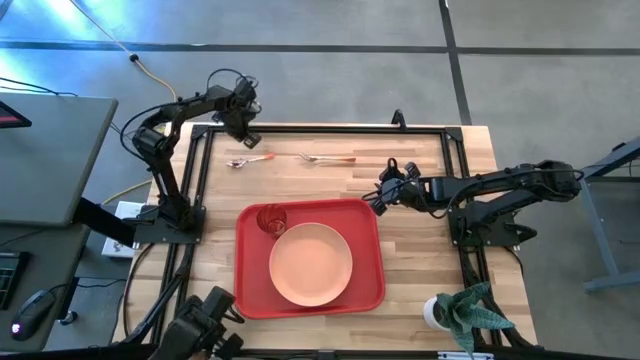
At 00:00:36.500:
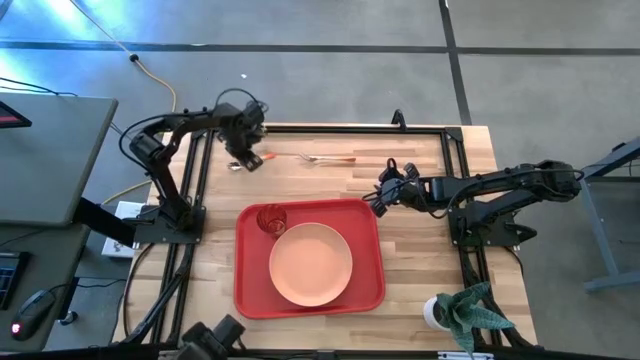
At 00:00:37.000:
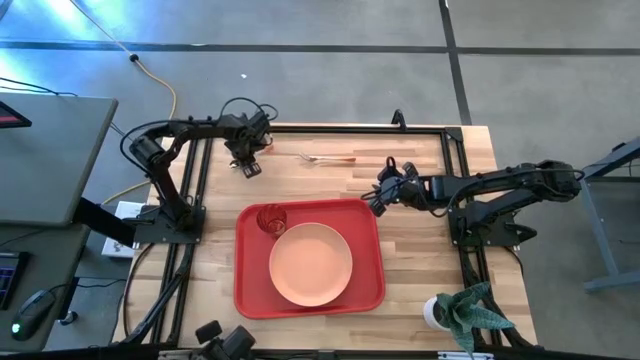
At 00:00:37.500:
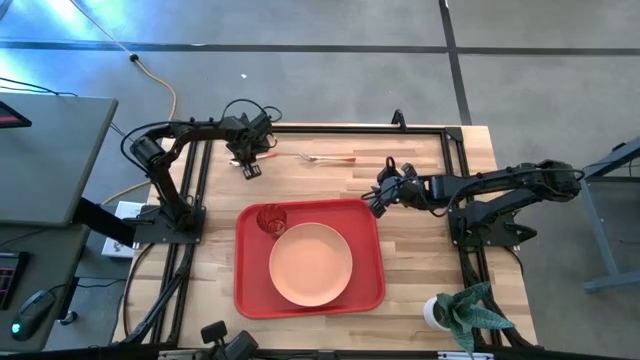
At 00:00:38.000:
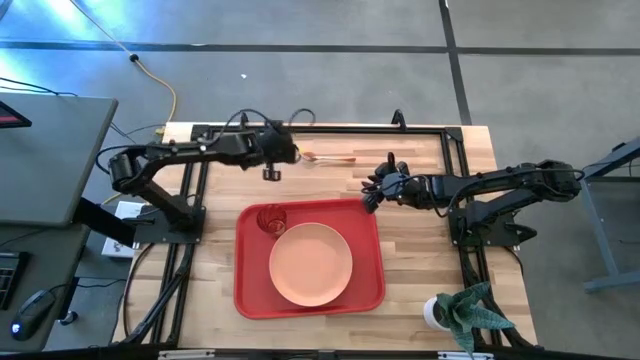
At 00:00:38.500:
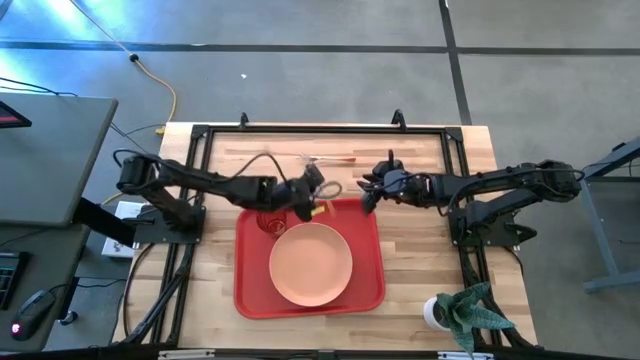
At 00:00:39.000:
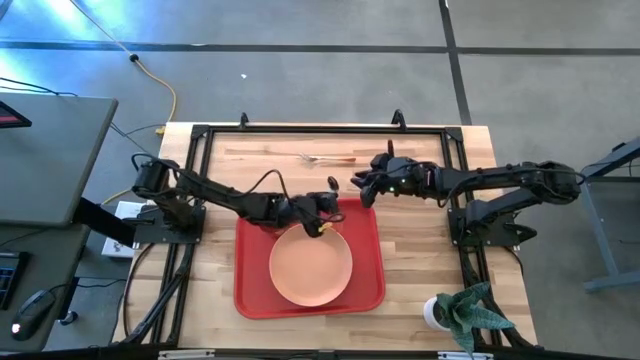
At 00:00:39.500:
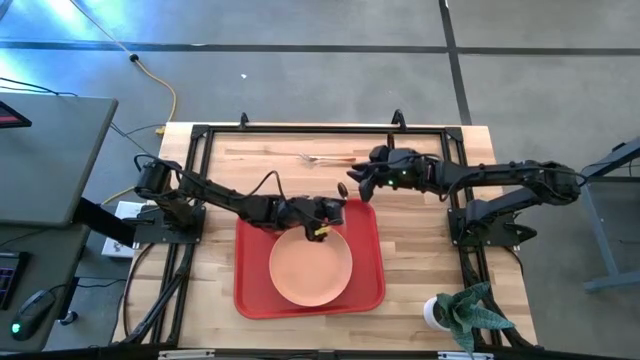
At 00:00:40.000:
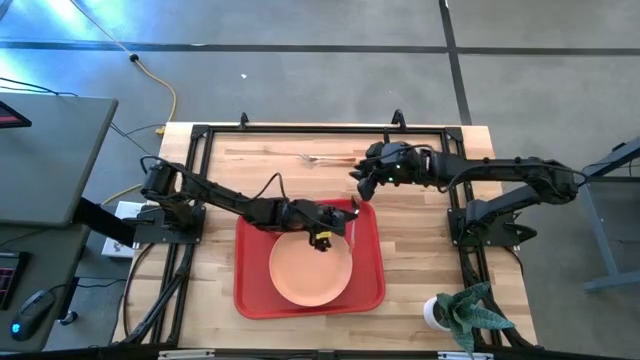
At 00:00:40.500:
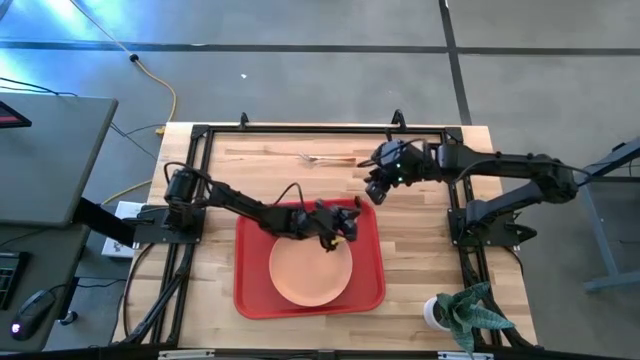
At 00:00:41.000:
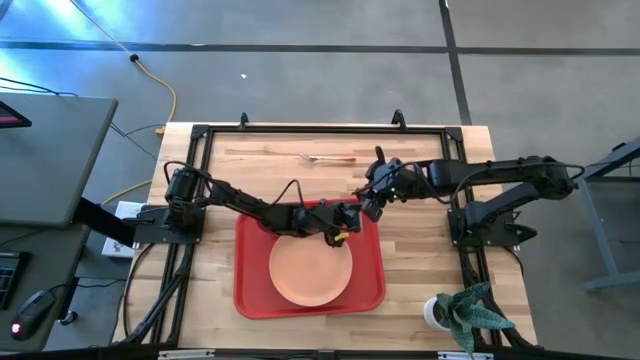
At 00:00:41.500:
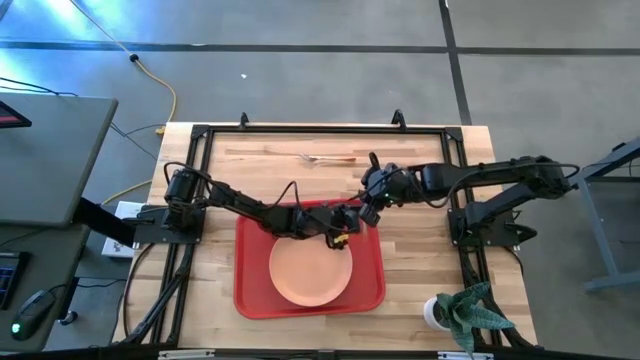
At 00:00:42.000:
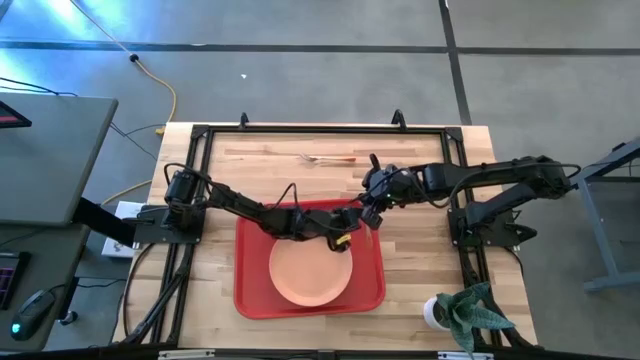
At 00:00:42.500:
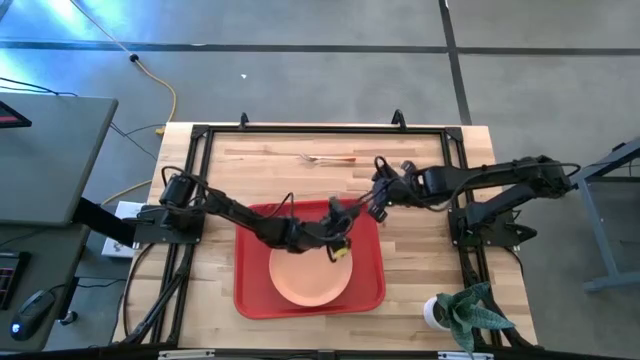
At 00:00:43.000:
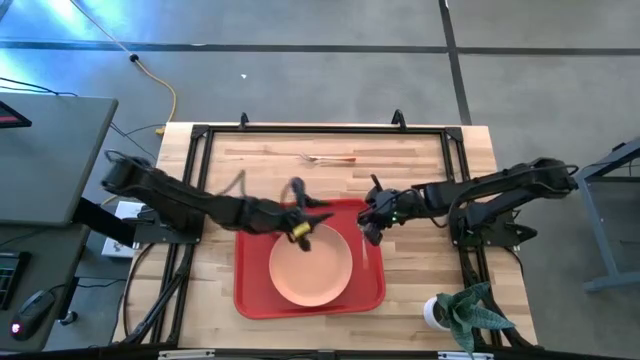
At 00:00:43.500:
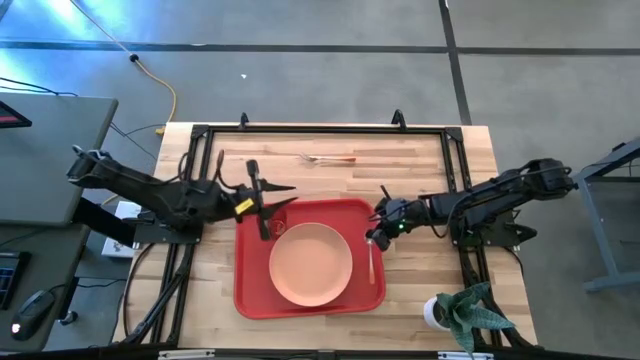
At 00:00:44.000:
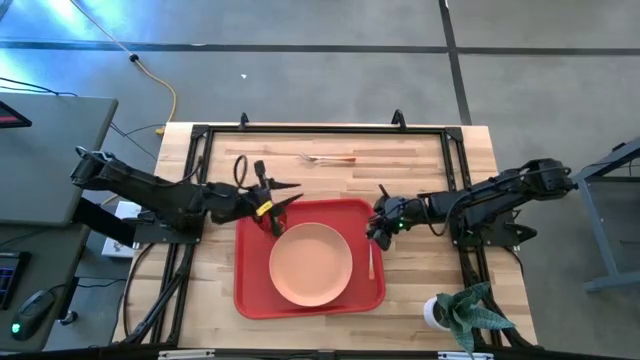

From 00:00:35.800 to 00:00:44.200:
Task: Pick and place plate/cup/fork/spoon on tray
Put the orange spoon on the red tray to the right of the orange plate

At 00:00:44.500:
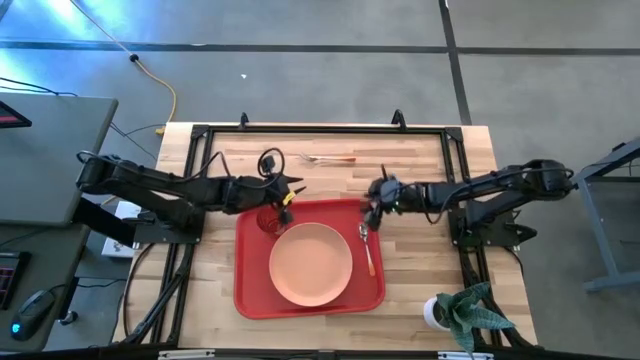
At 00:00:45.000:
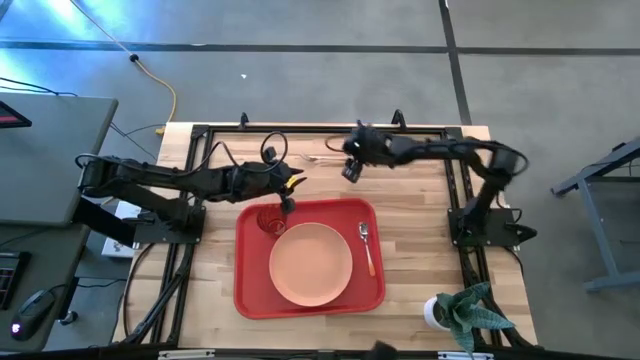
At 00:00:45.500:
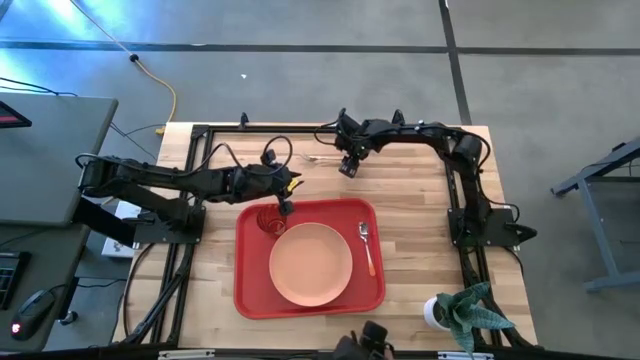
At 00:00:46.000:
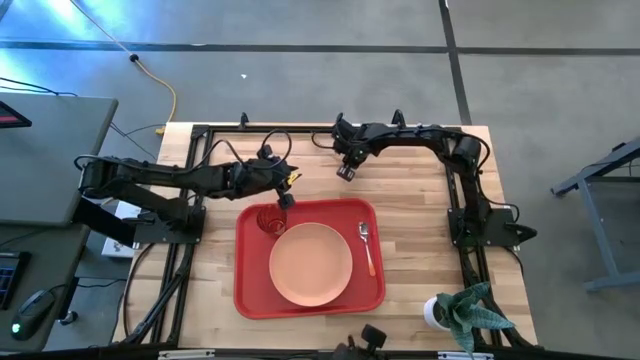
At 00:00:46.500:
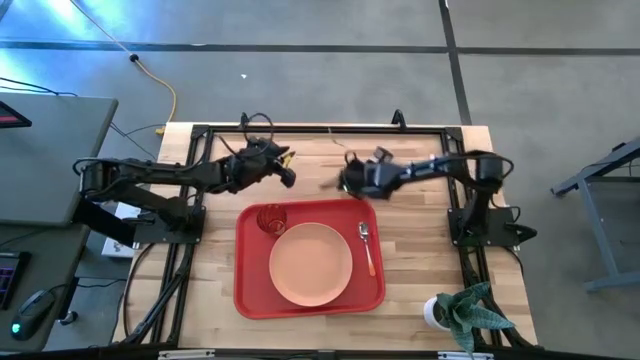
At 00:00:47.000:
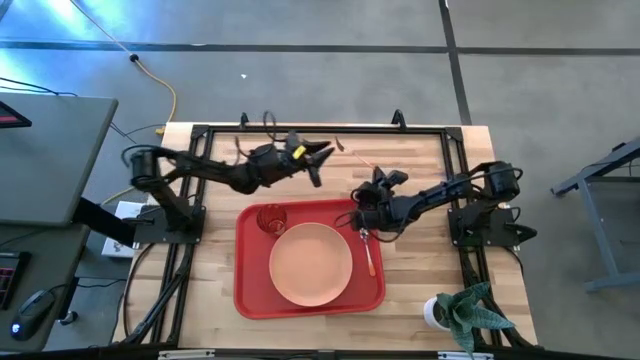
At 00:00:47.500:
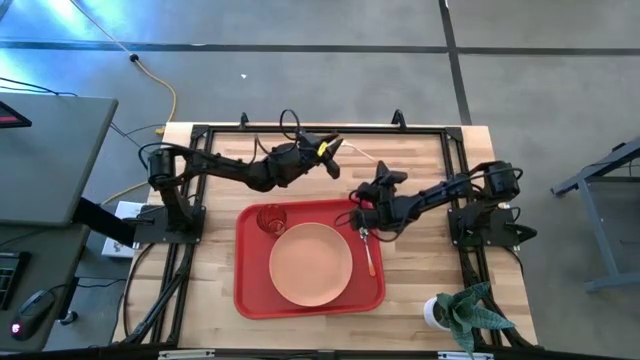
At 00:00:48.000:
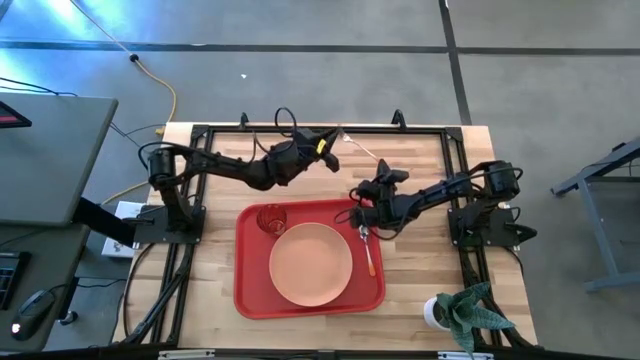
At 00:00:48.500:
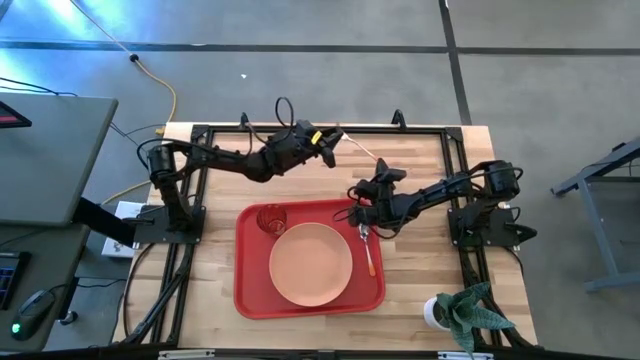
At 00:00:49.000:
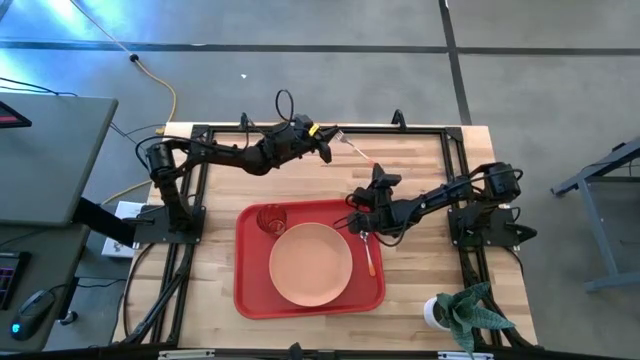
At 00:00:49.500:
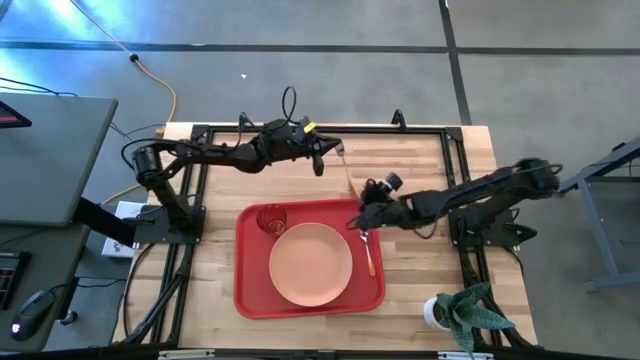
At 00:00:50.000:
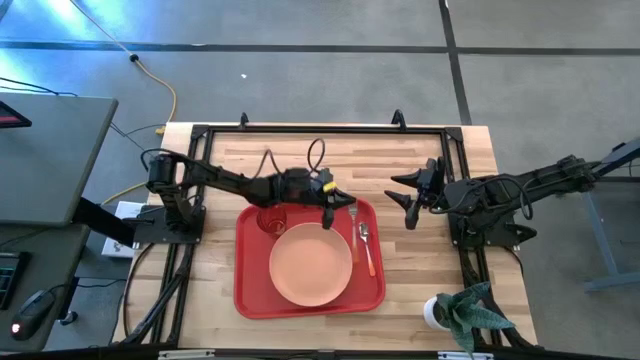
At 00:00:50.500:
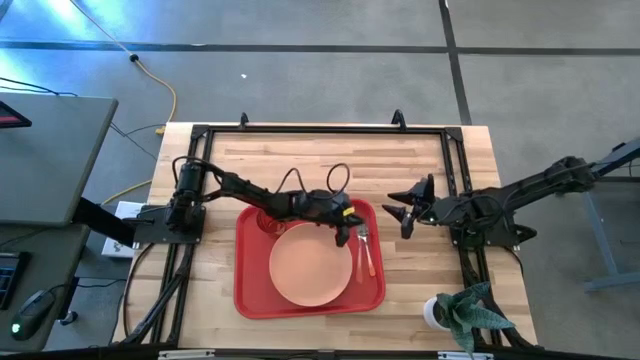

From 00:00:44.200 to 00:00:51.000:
Put the orange fork on the red tray to the right of the orange plate

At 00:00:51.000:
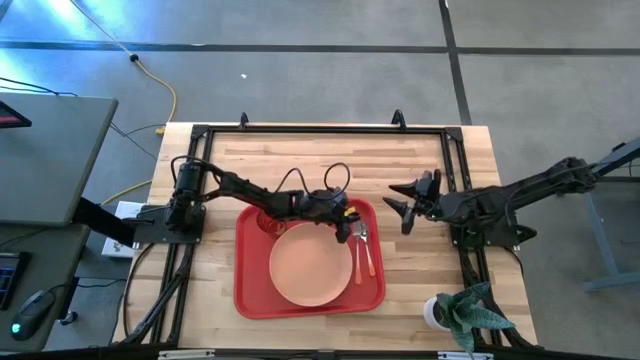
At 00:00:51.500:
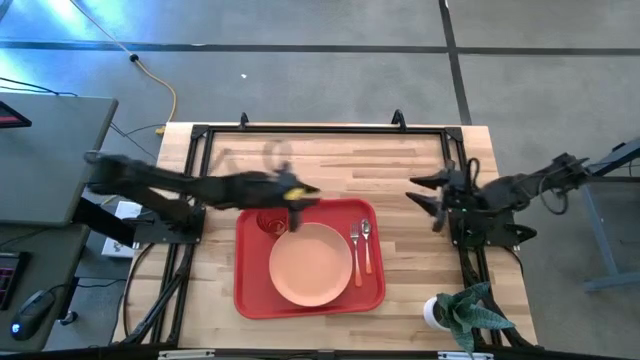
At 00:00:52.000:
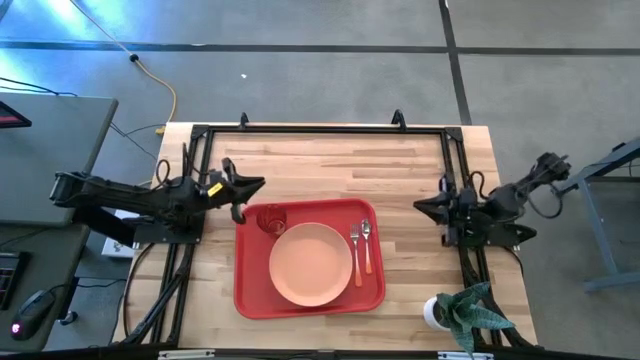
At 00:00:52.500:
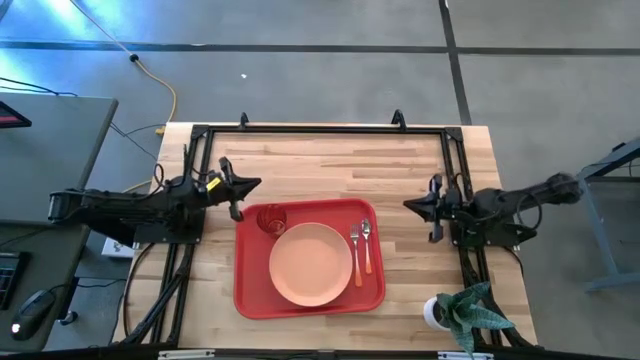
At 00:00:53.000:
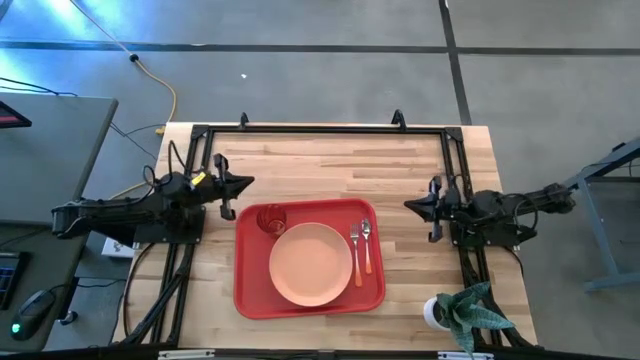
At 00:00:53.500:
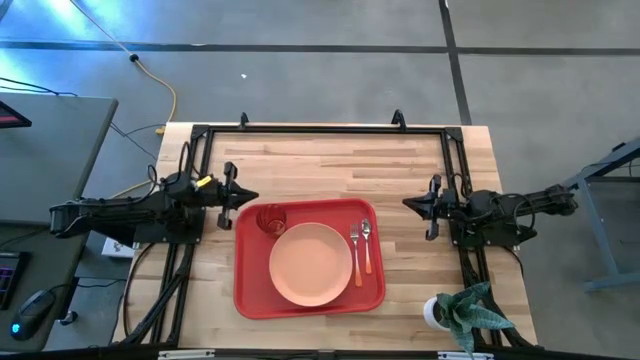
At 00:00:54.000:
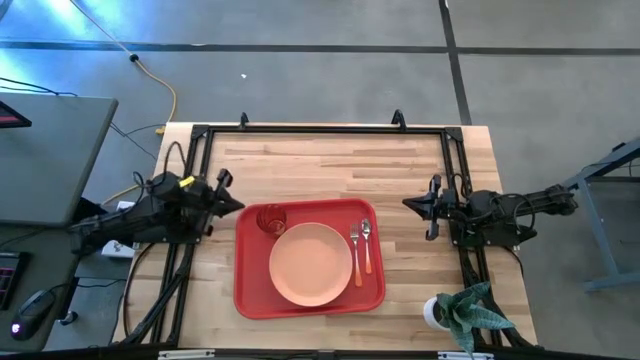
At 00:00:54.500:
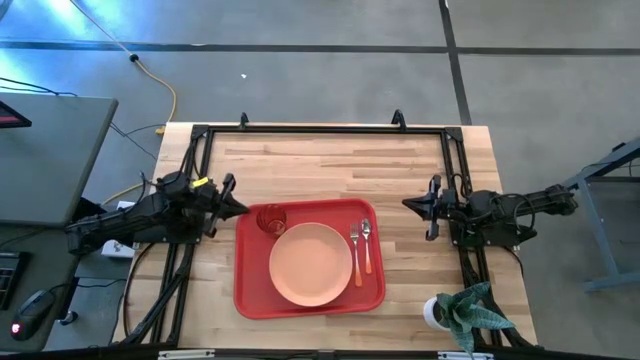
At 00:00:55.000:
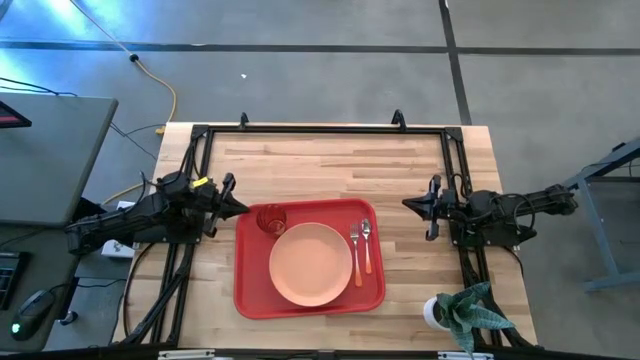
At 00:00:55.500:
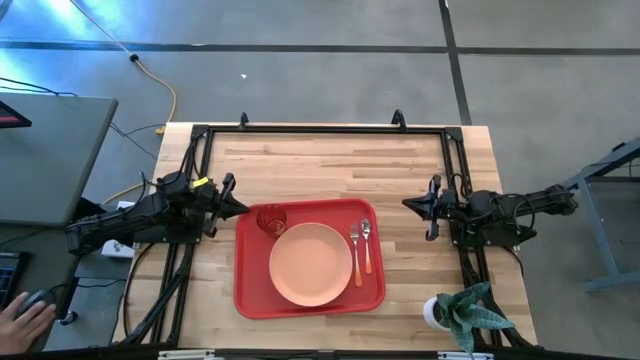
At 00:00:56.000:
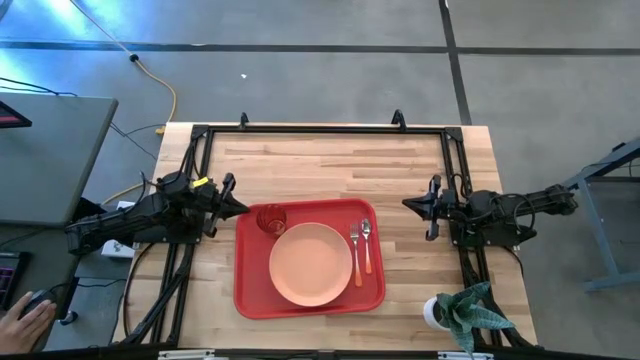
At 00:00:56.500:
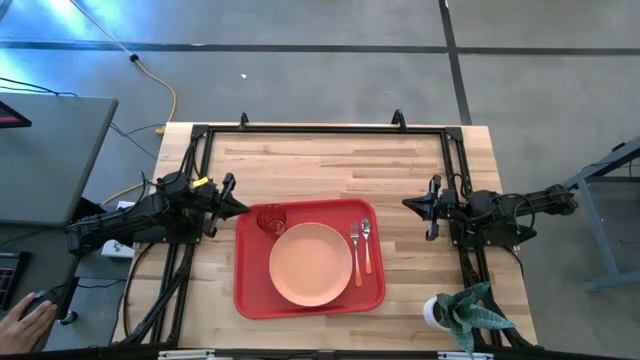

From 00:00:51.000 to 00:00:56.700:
Return to Home Position
